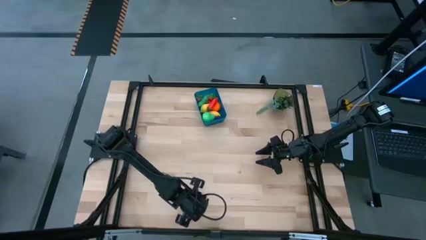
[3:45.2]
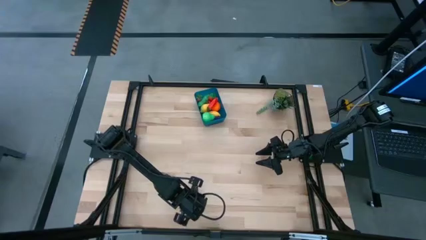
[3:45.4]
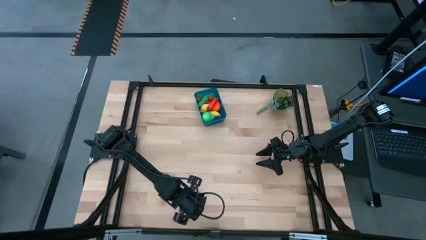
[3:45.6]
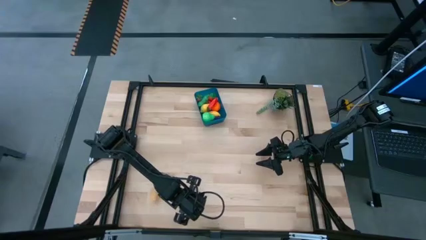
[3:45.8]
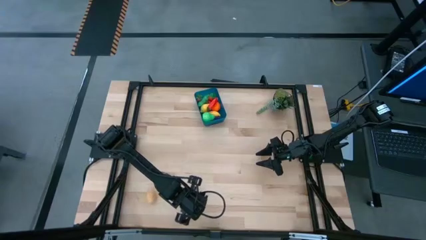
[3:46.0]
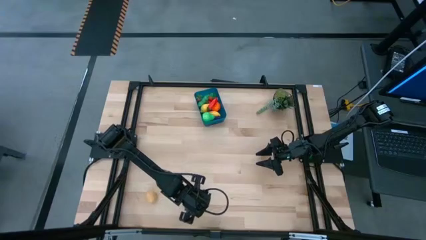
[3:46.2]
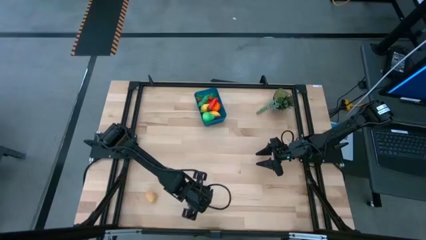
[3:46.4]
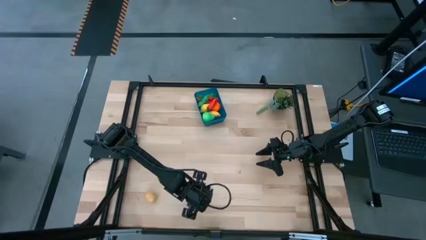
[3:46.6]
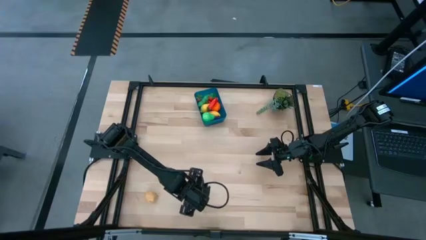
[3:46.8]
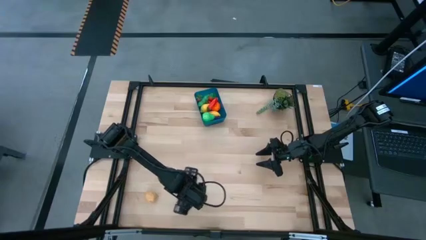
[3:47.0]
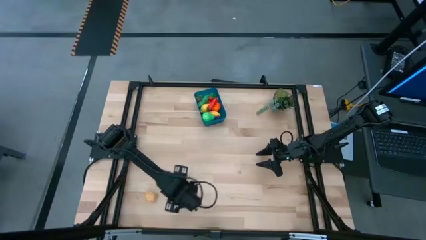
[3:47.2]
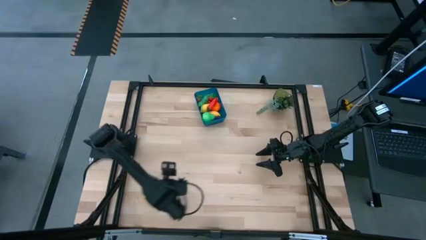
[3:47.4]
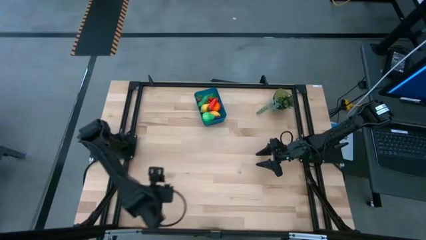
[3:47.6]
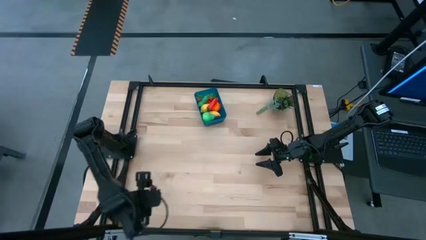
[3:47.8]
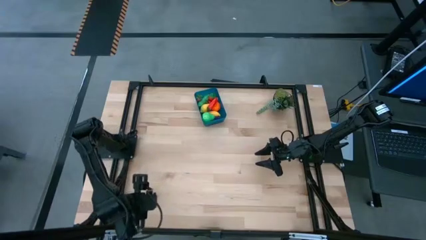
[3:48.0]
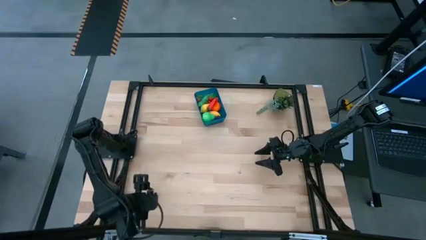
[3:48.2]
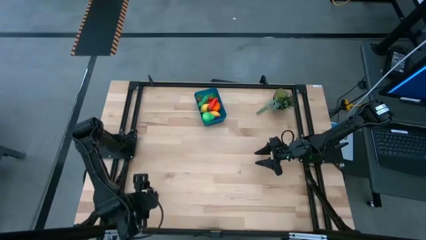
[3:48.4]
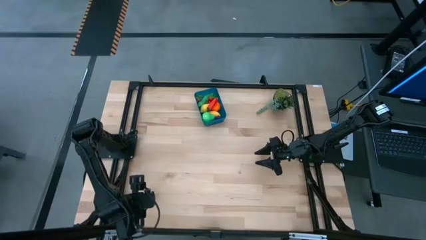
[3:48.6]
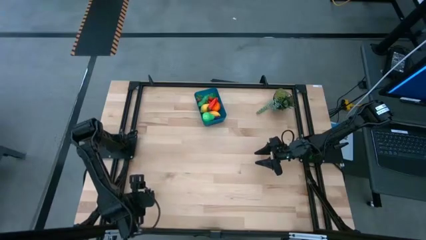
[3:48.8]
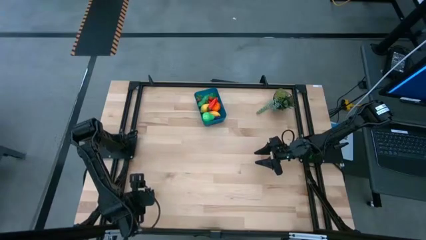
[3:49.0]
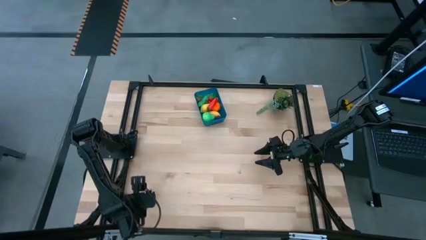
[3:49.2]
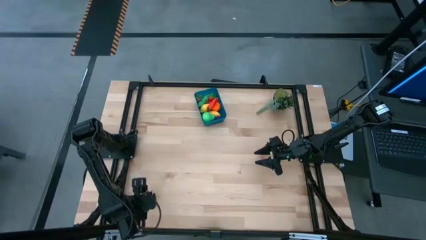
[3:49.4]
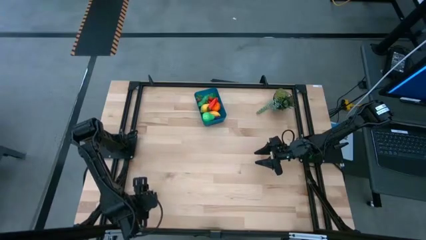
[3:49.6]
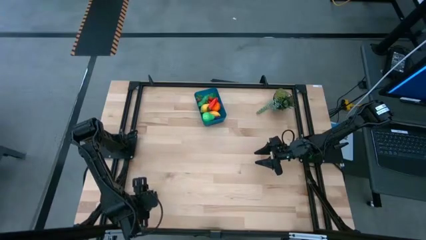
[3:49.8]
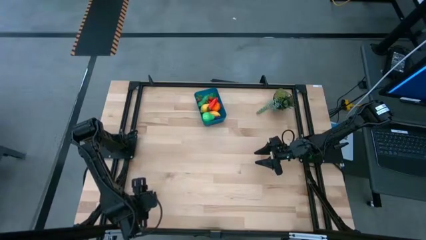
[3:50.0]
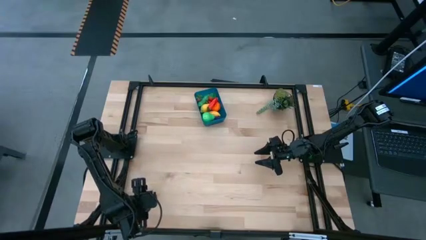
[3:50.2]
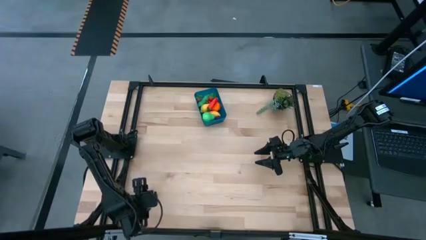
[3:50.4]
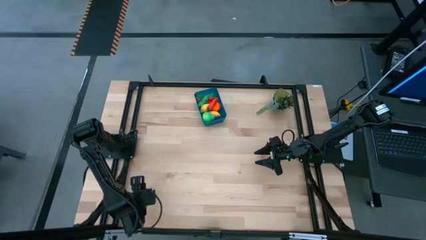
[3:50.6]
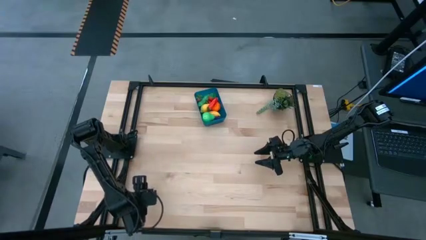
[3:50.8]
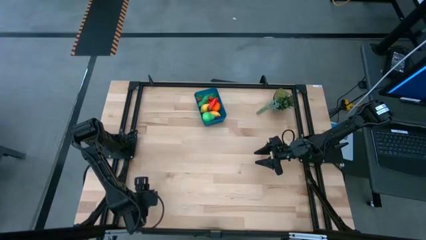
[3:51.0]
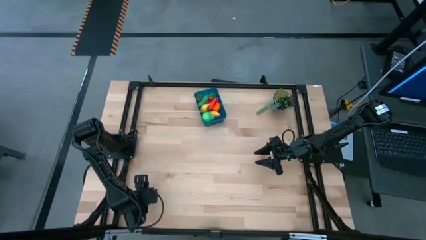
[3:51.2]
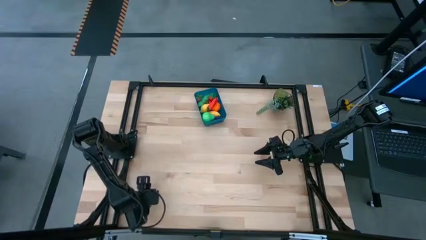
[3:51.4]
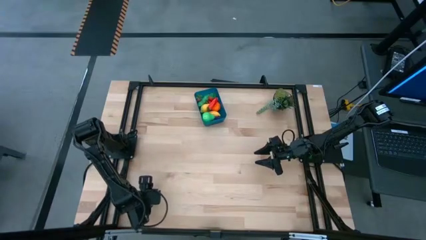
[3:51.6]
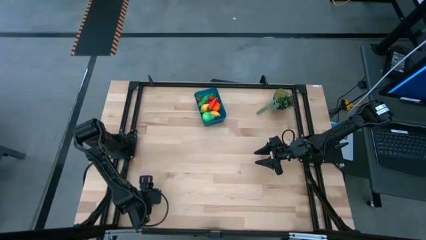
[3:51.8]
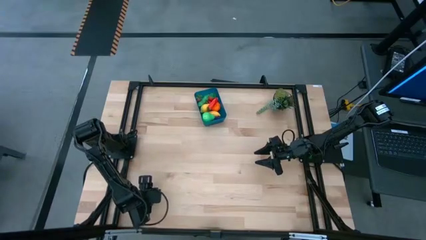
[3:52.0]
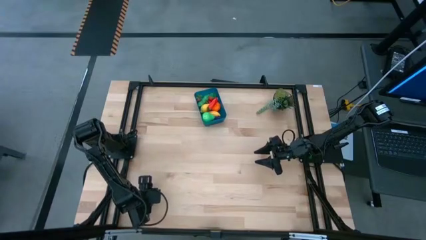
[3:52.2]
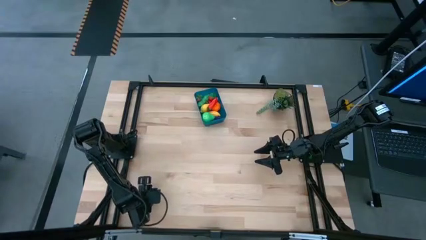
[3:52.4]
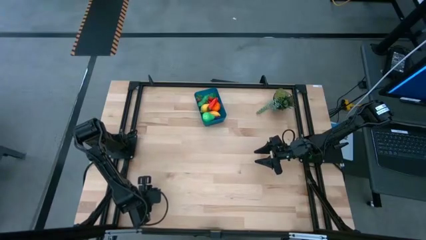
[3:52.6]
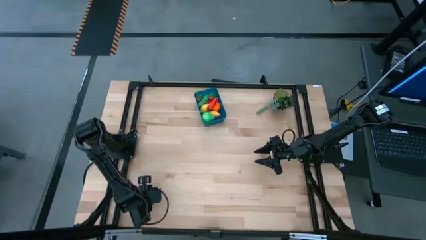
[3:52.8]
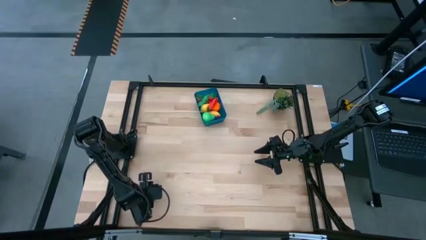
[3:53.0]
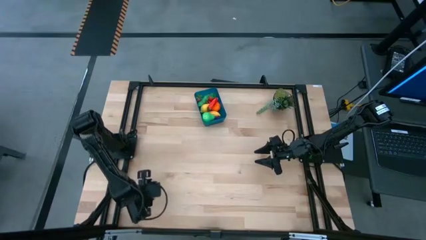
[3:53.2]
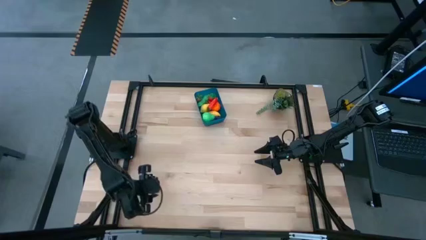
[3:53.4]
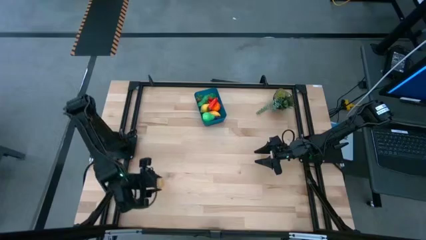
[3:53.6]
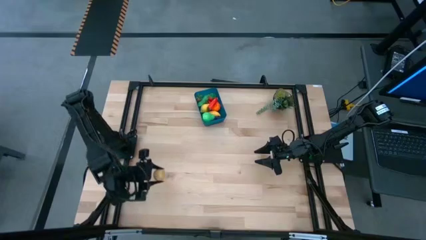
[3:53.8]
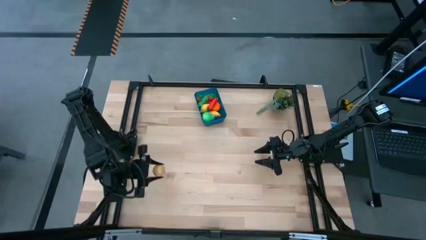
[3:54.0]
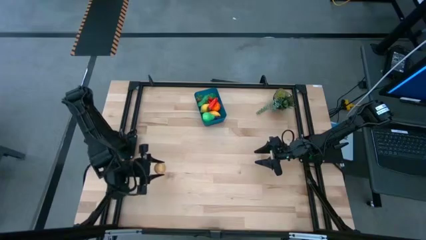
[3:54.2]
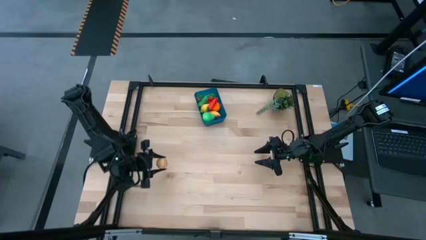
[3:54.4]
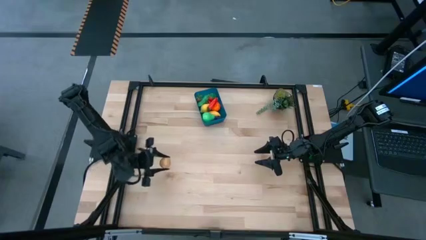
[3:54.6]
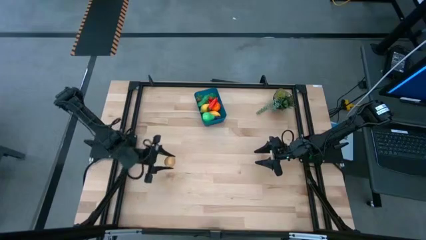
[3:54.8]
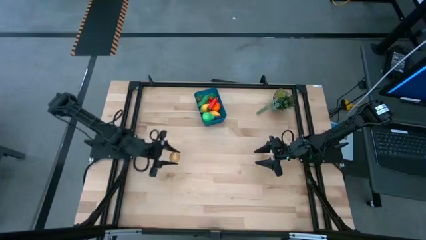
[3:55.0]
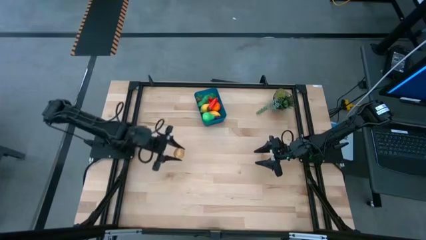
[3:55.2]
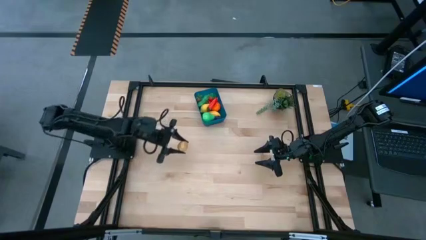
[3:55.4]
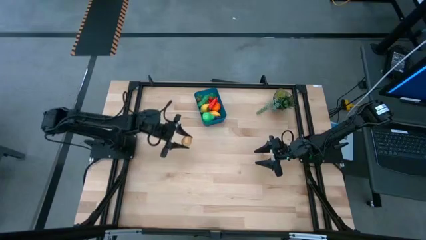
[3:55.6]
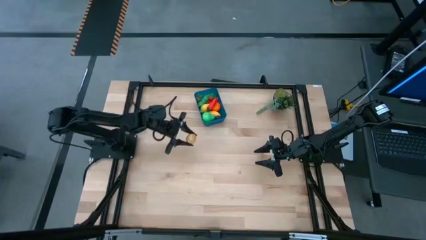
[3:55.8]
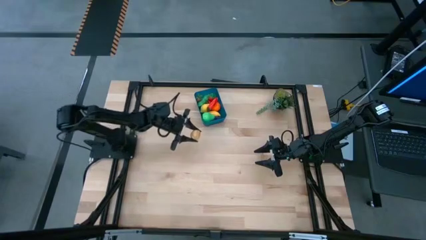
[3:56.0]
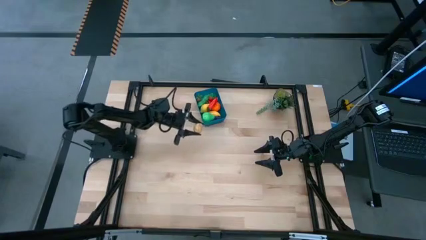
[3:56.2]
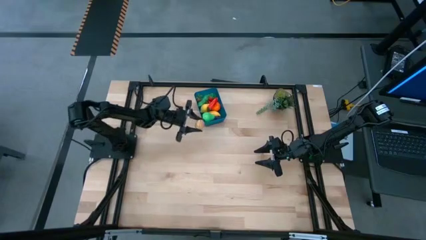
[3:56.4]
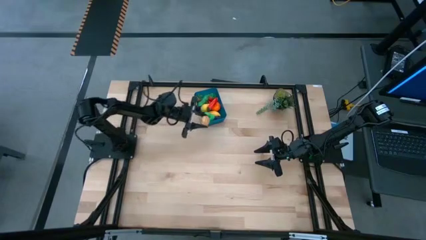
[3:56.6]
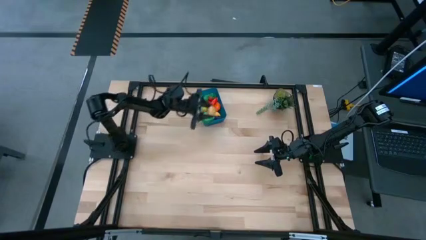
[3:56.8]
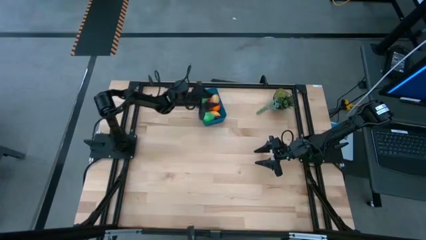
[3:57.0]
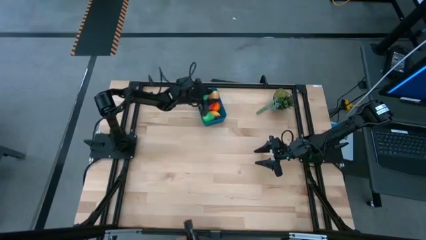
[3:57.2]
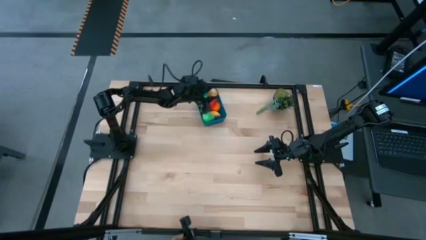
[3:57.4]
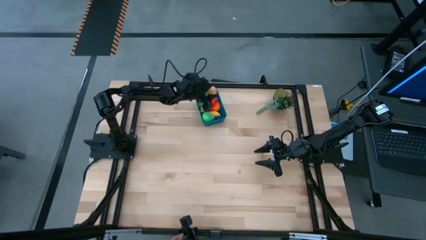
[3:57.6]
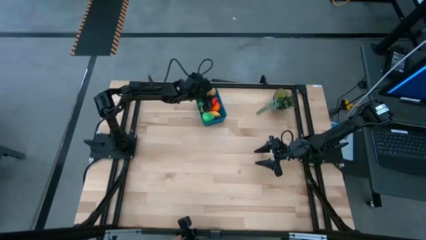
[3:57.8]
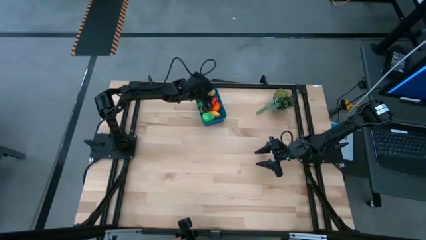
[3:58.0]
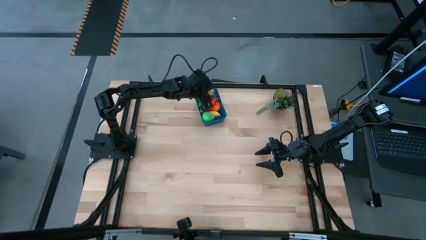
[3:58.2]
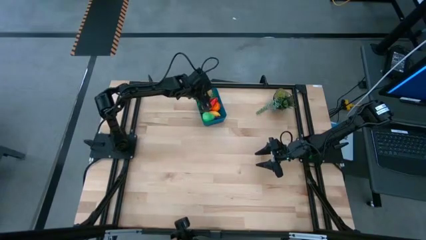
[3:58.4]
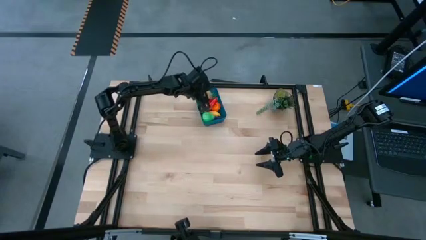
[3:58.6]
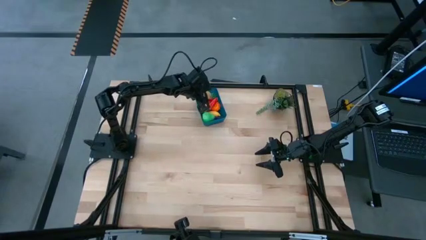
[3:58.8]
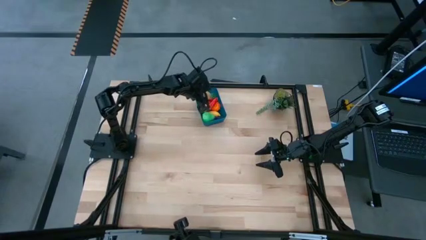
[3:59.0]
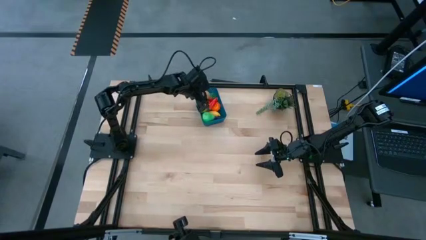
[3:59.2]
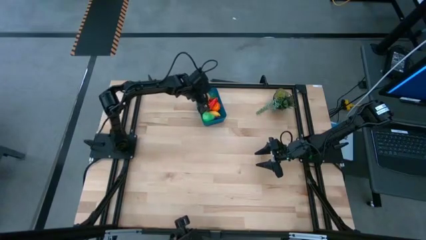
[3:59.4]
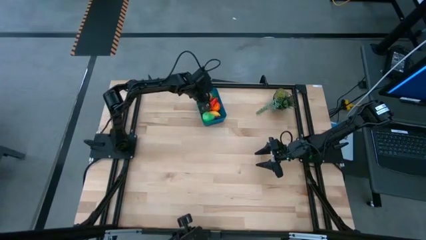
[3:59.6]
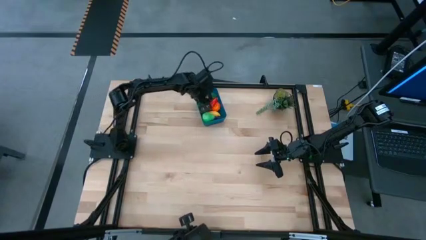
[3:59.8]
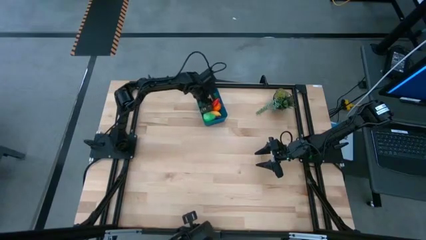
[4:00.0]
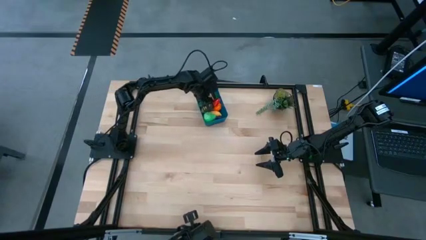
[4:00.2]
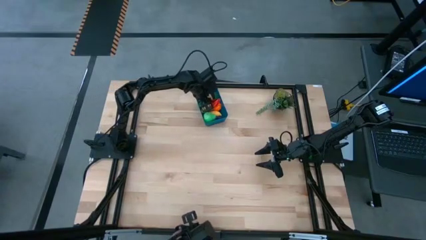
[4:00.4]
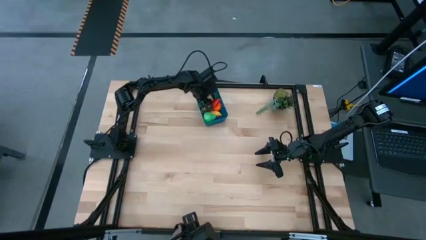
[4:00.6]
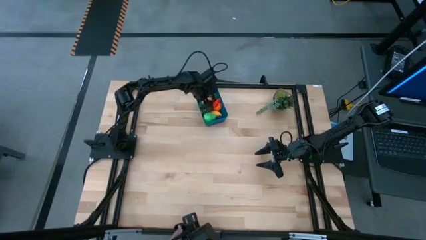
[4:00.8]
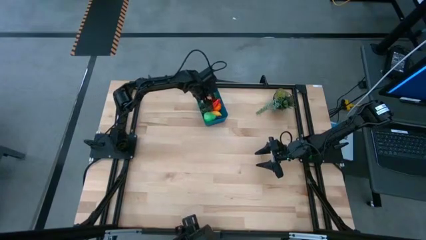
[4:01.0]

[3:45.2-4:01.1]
Task: Pick and placing Produce into tupperware
Put the potato into the blue bin

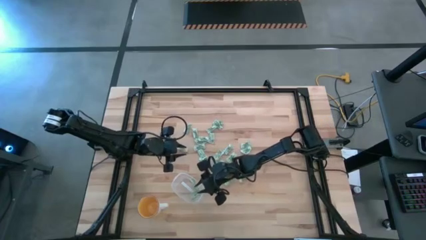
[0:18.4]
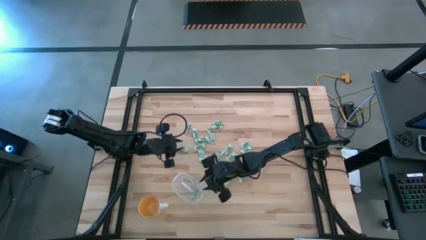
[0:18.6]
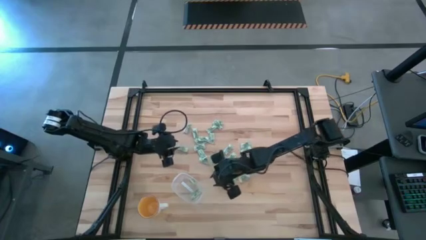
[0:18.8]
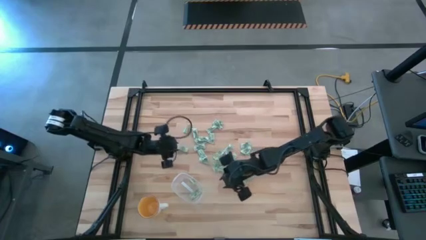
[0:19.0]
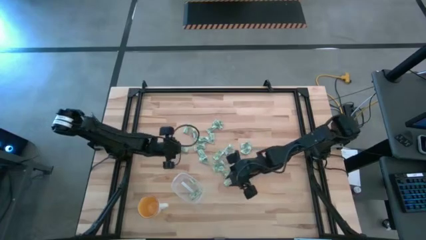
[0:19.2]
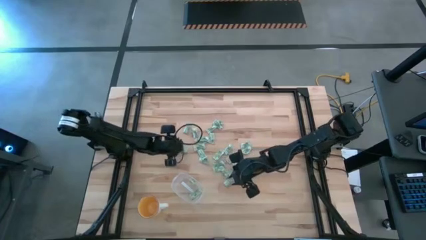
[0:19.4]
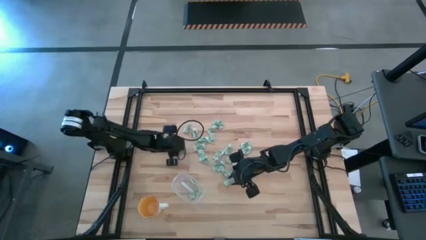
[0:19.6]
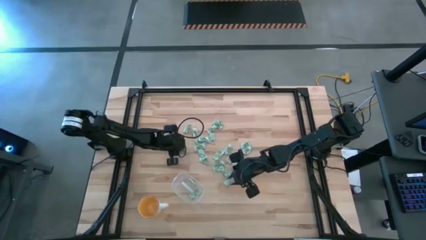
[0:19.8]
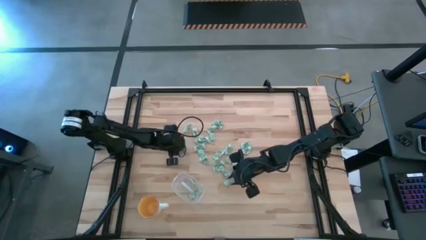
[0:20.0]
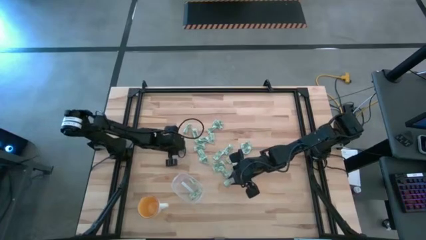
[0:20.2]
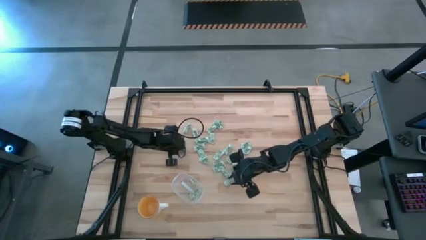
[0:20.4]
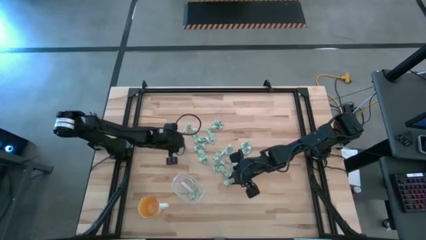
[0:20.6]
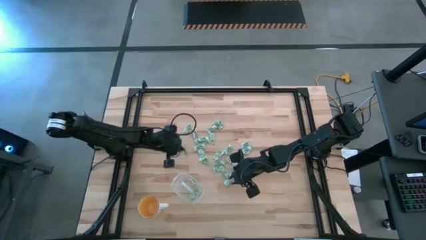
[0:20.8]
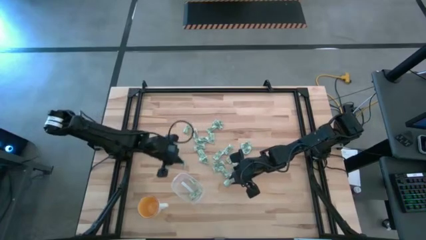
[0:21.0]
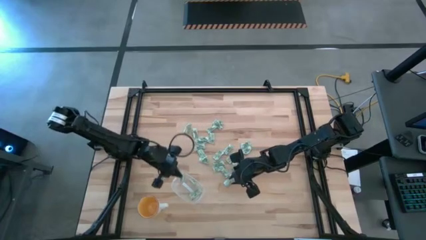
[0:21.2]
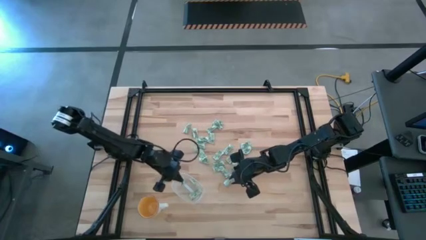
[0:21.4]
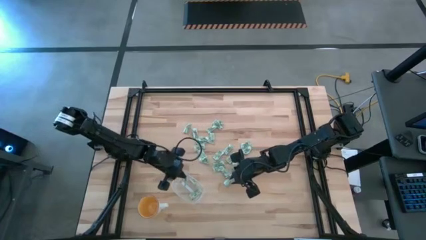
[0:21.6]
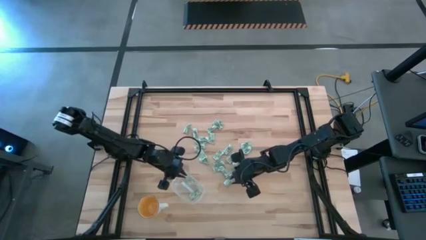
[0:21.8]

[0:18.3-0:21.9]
Task: Pick and place Stevia / Truvia into bins
Put the stevia packet into the transparent container
